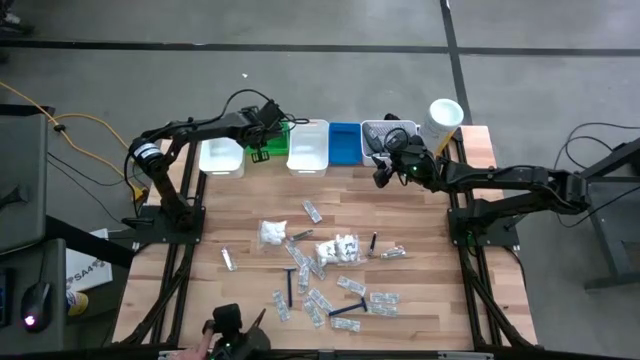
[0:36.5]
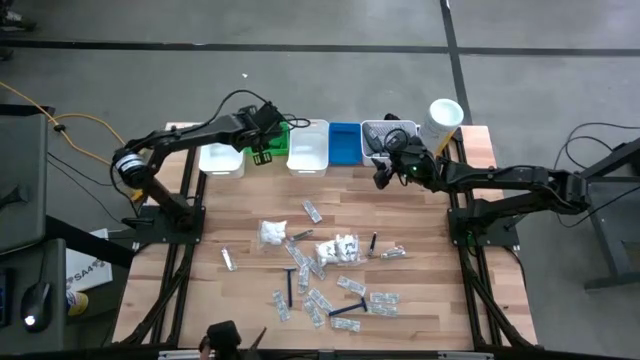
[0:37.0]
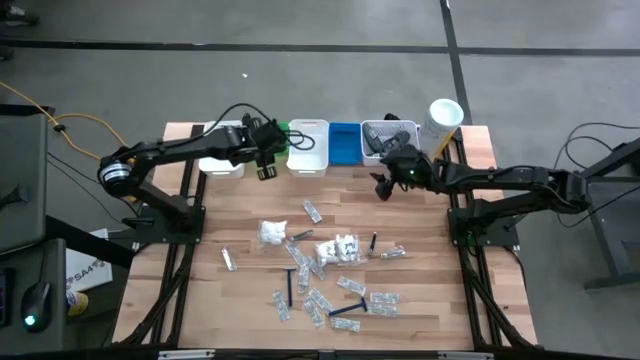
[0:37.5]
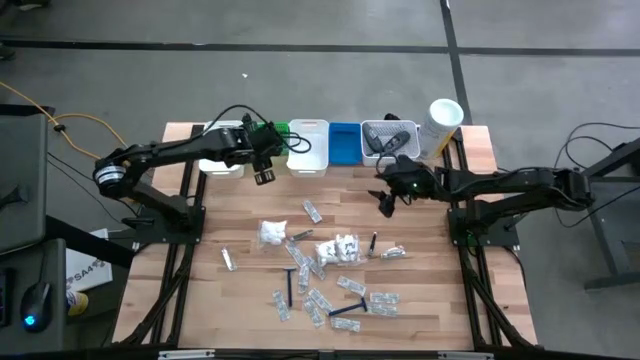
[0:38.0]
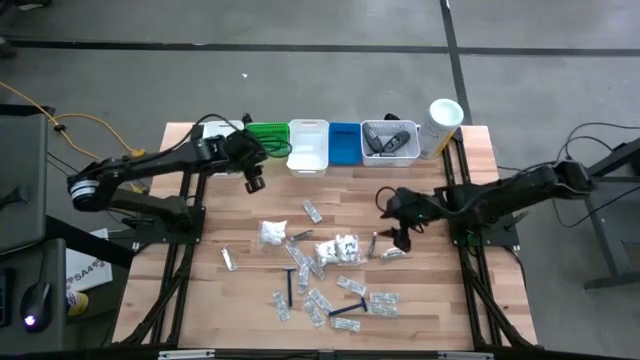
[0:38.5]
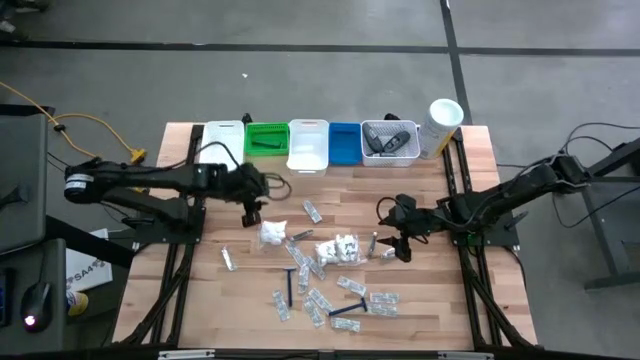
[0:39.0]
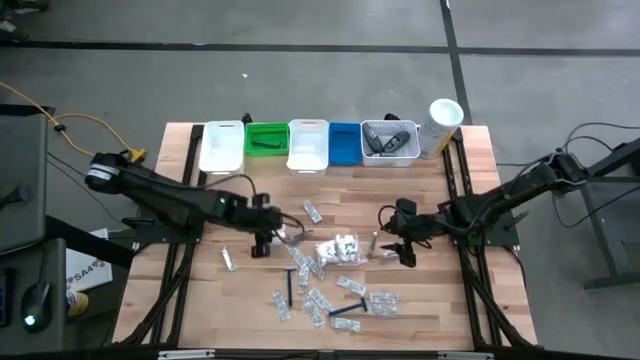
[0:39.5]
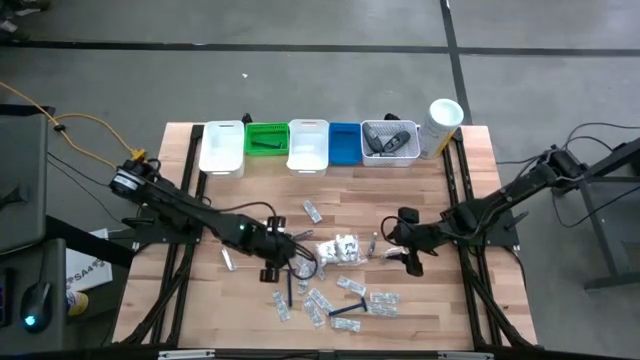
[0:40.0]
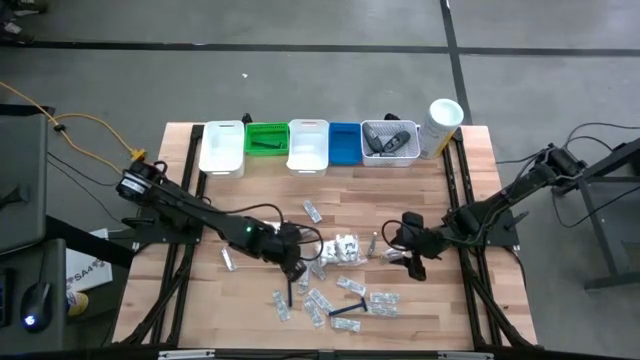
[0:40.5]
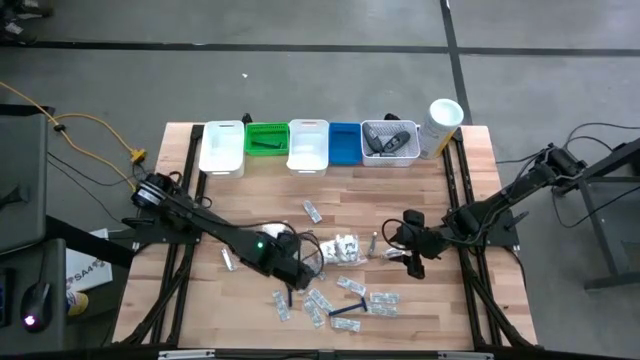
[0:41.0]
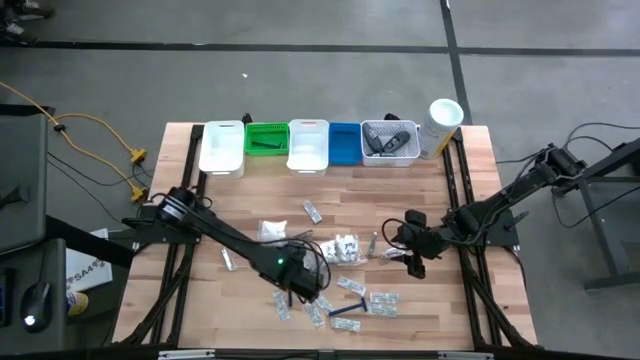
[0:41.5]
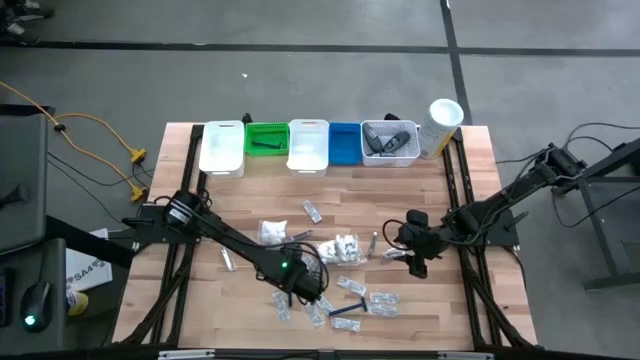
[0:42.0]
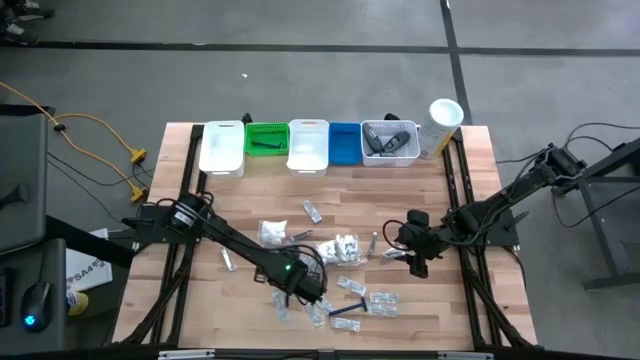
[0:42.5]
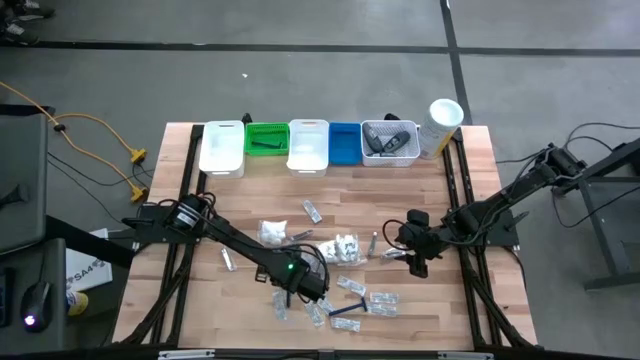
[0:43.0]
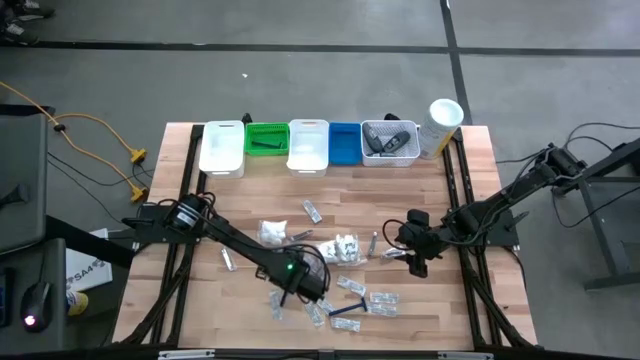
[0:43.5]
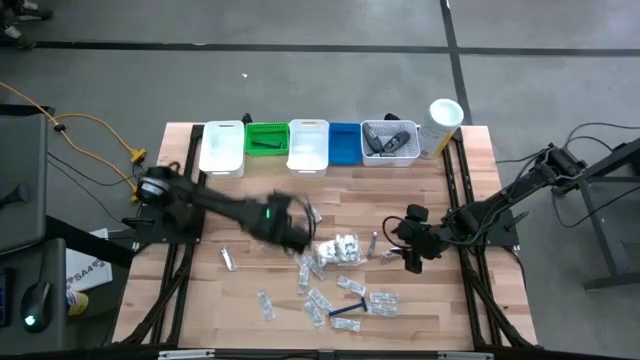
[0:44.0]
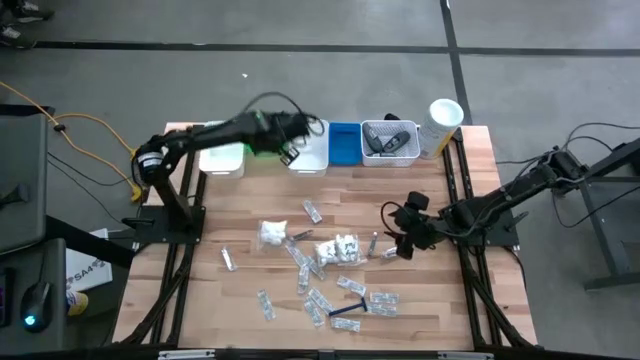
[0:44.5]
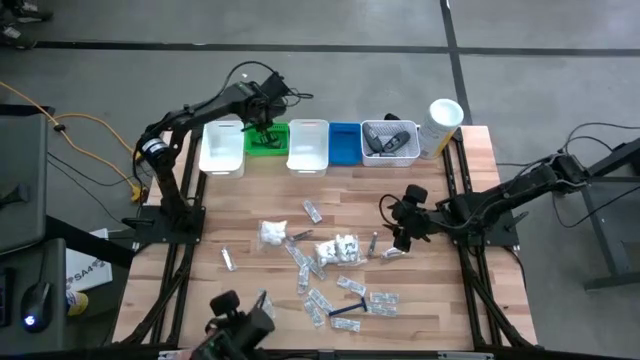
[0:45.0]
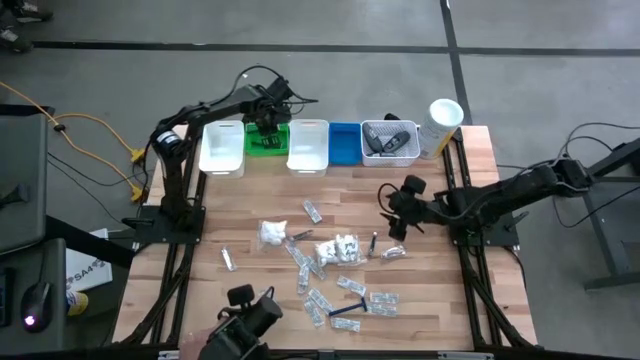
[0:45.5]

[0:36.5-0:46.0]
Task: Pick & Place Travel size toiletries
Put the blue razor into the green bin

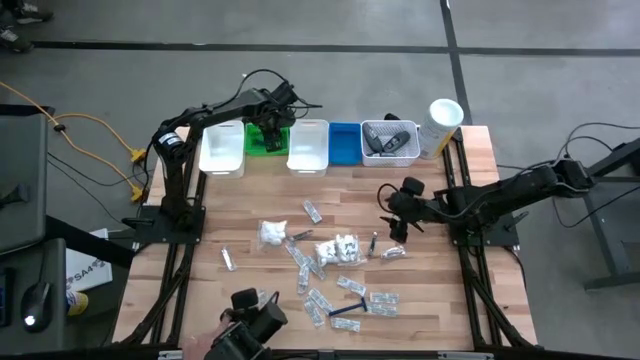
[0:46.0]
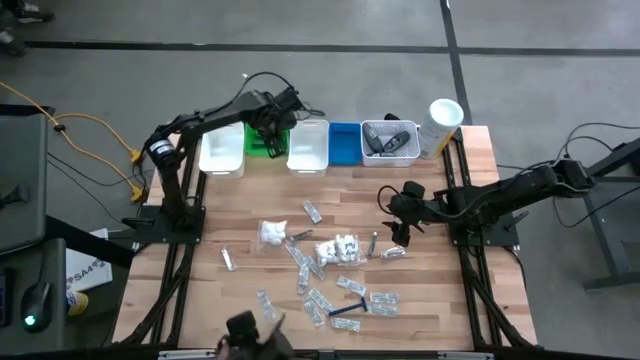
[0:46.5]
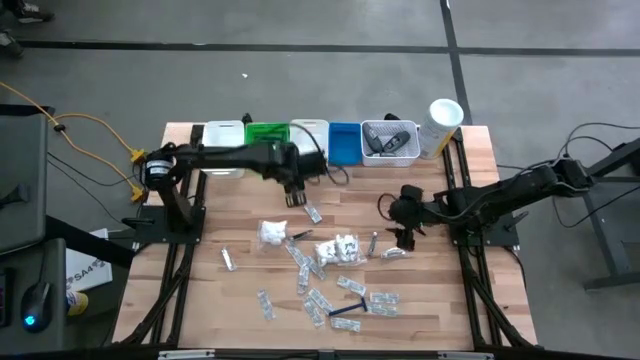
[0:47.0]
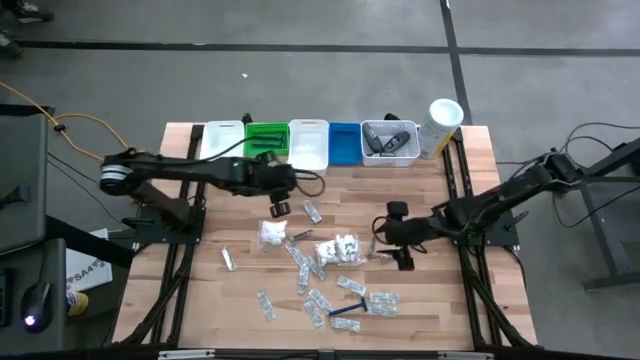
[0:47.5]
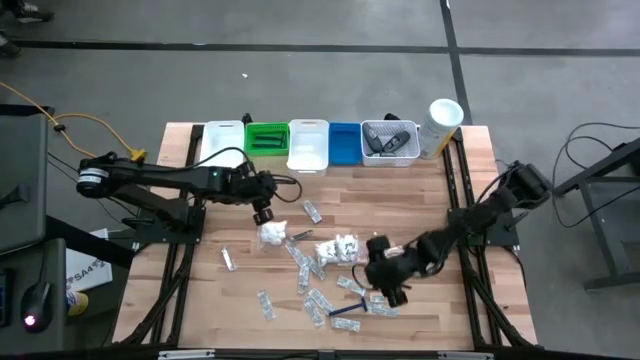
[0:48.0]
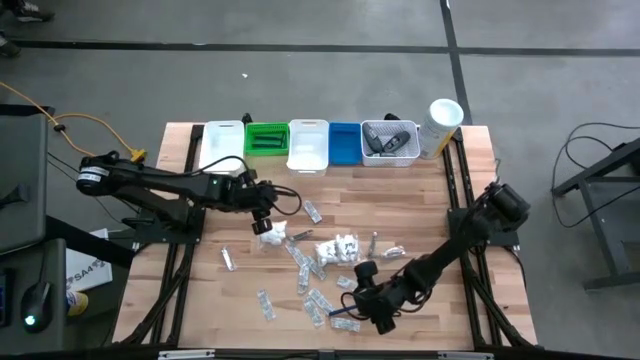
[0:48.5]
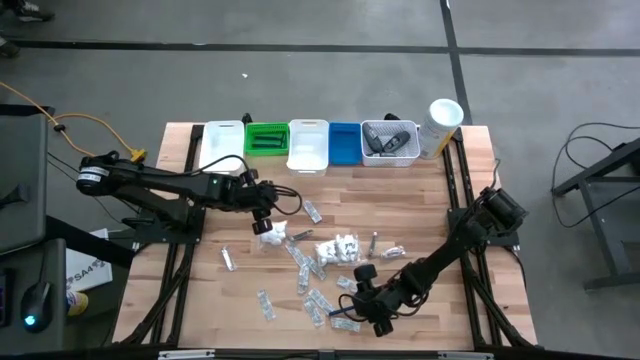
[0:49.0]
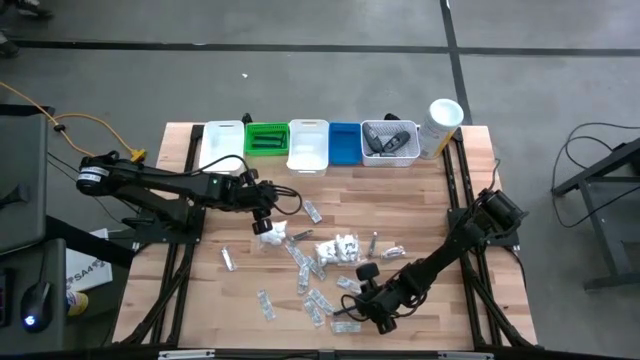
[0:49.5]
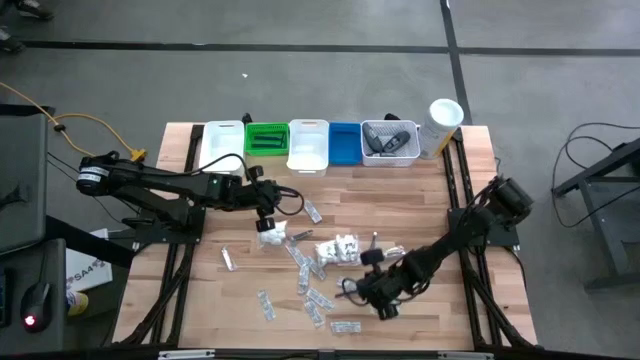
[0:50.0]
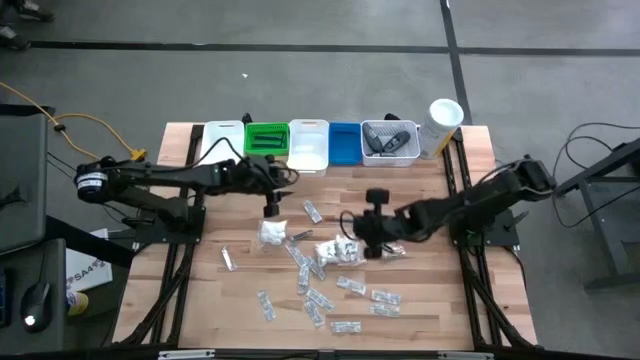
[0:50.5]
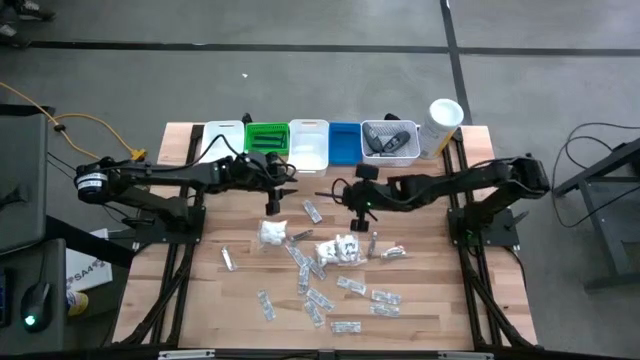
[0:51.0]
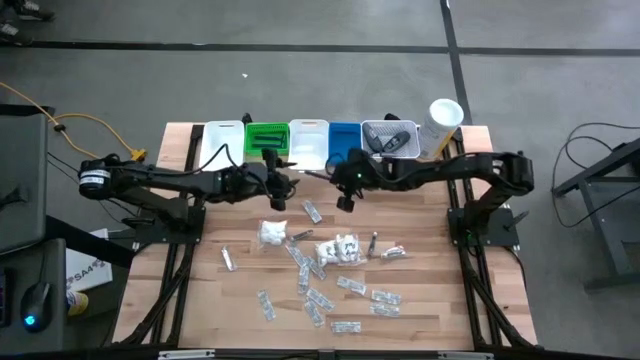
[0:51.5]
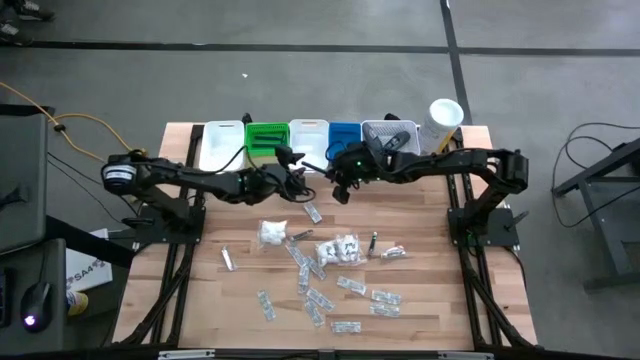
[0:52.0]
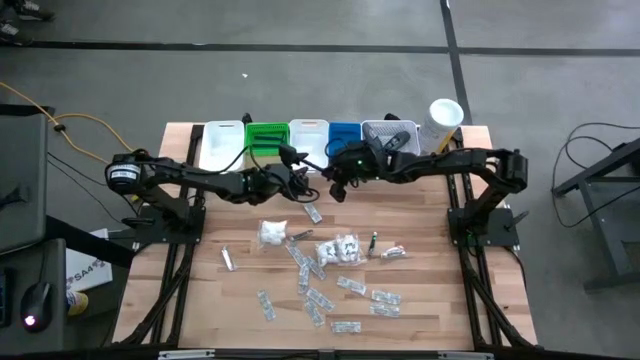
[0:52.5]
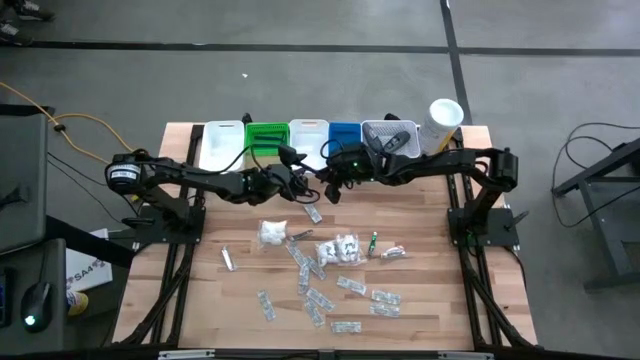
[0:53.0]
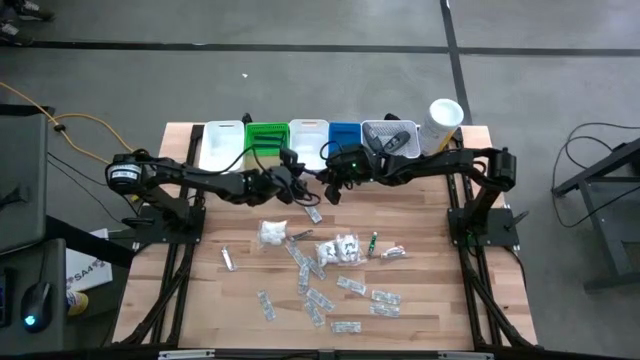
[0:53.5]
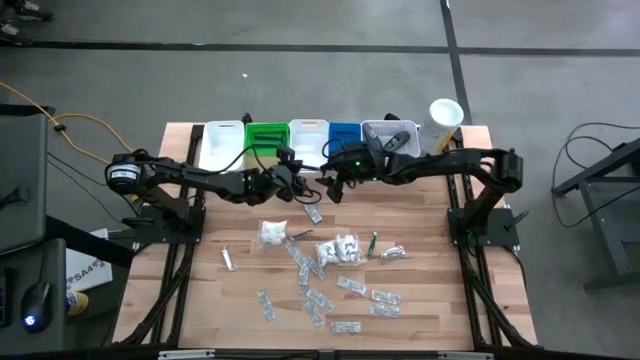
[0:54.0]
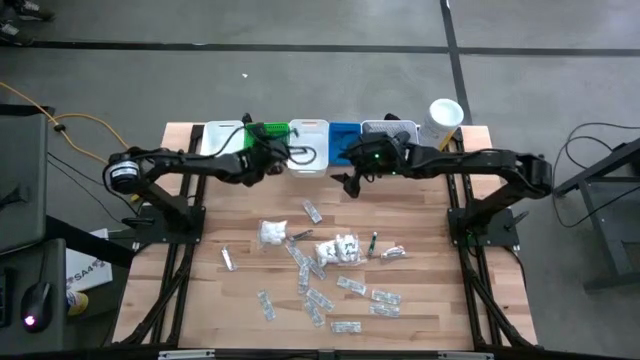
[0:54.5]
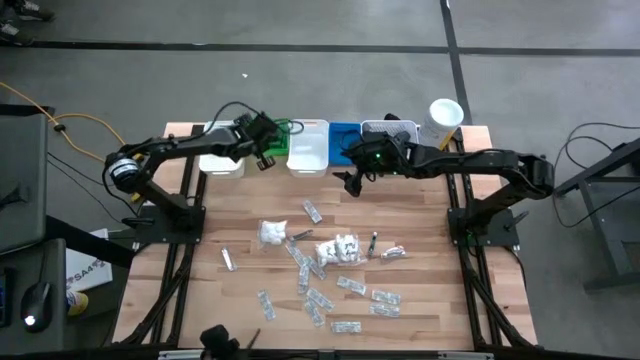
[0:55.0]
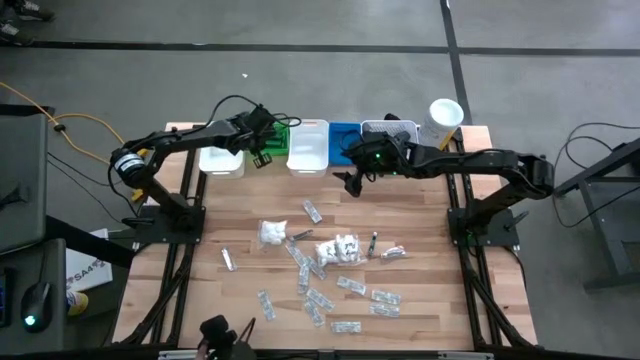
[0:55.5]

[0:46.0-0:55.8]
Put the blue razor into the green bin

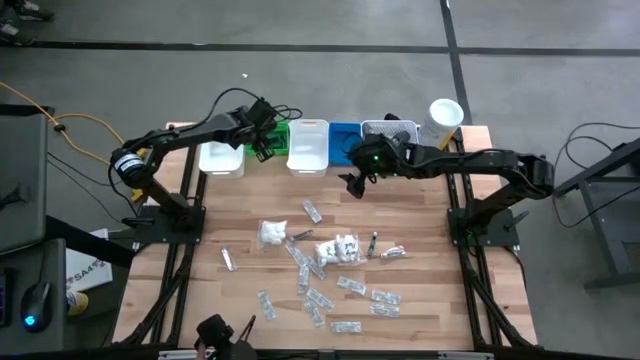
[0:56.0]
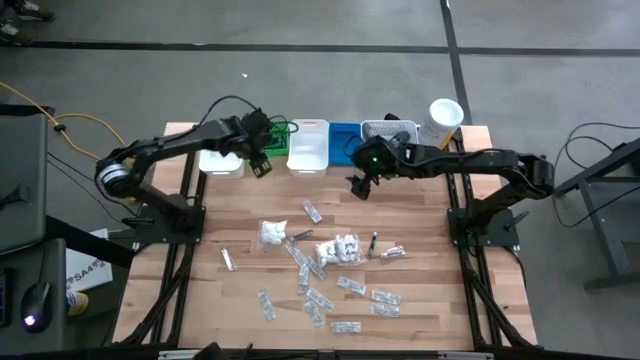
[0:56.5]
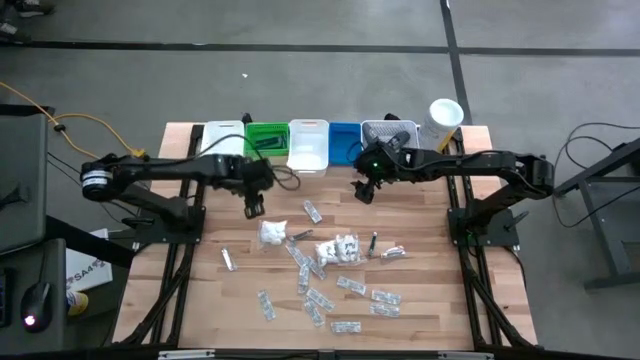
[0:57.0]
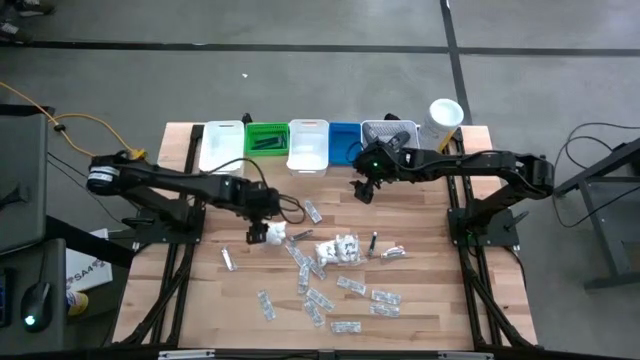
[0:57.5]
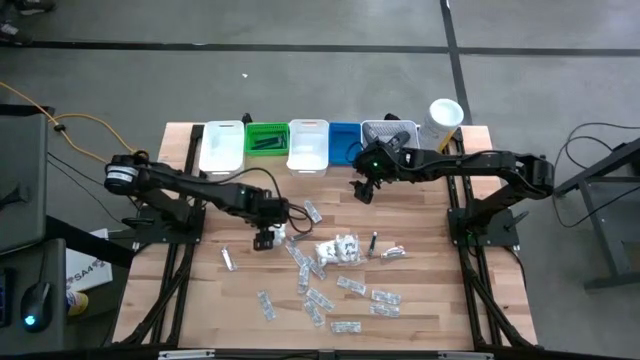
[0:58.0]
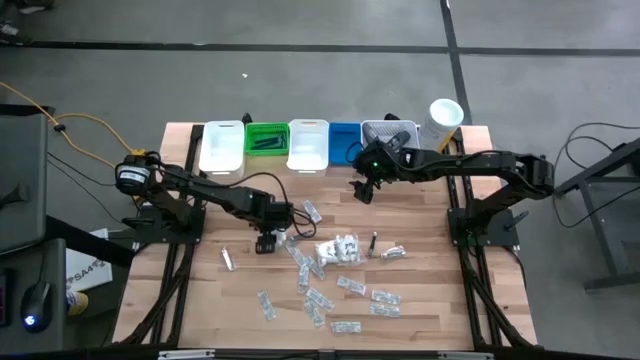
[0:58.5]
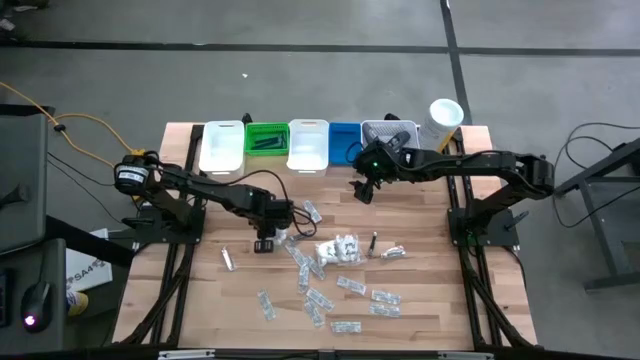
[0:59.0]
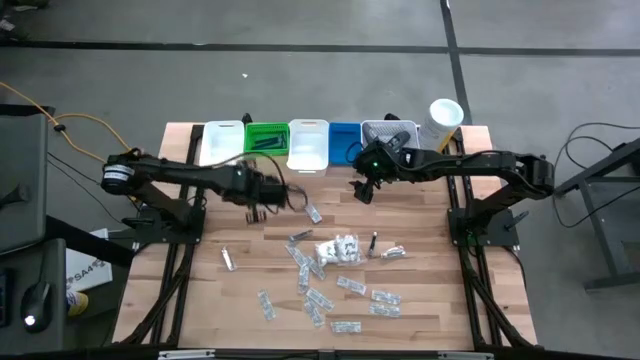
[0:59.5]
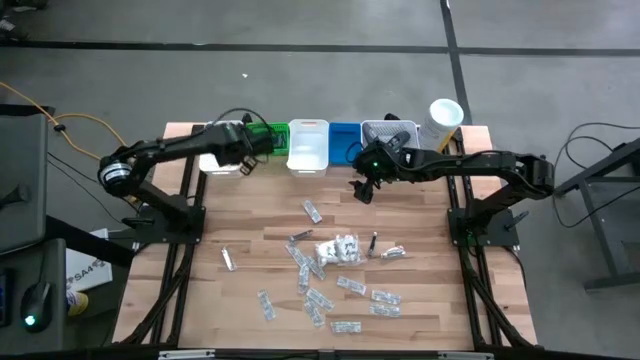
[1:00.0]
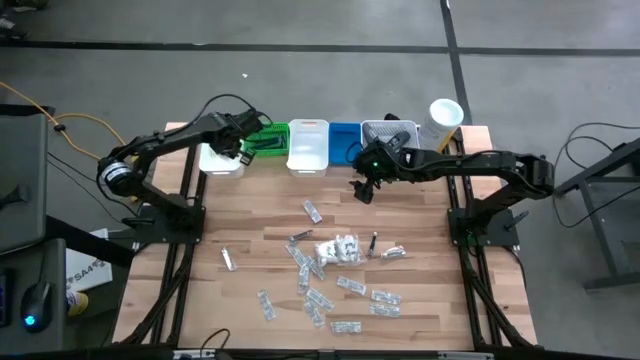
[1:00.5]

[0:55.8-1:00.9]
Put the transparent cotton pack into the left white bin
